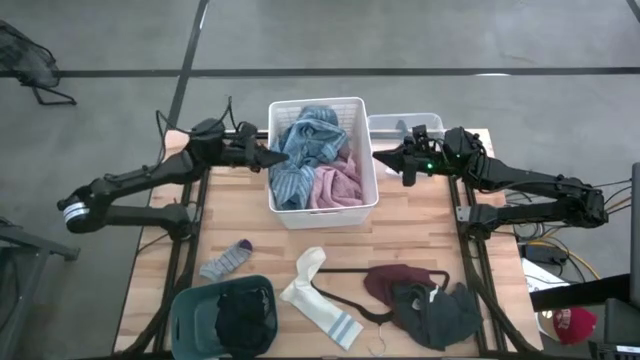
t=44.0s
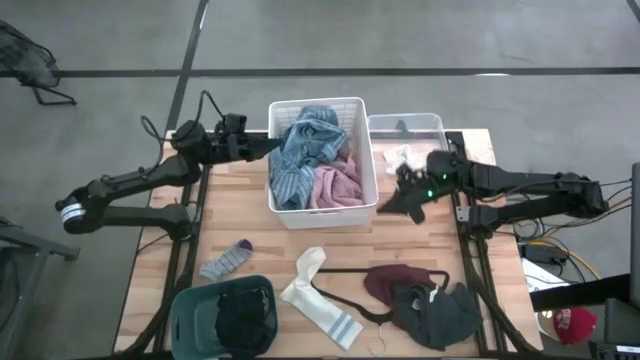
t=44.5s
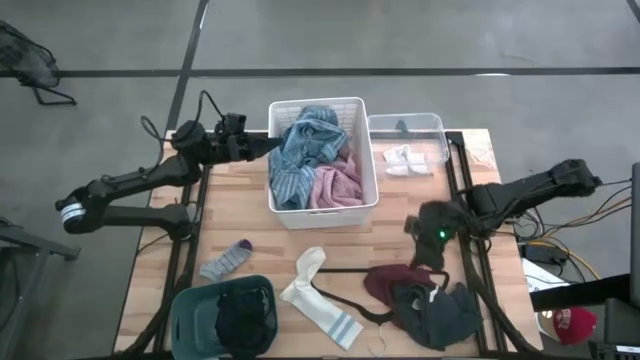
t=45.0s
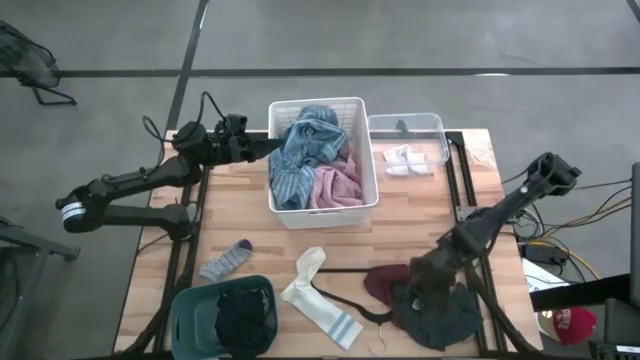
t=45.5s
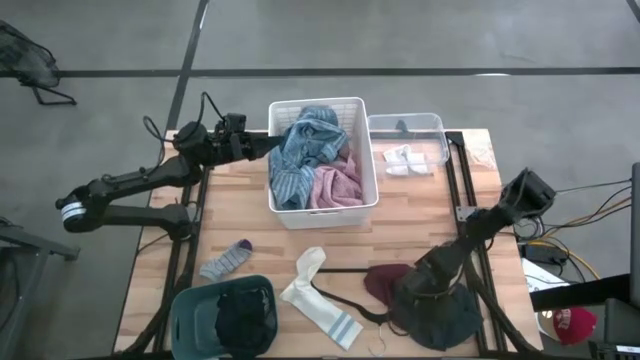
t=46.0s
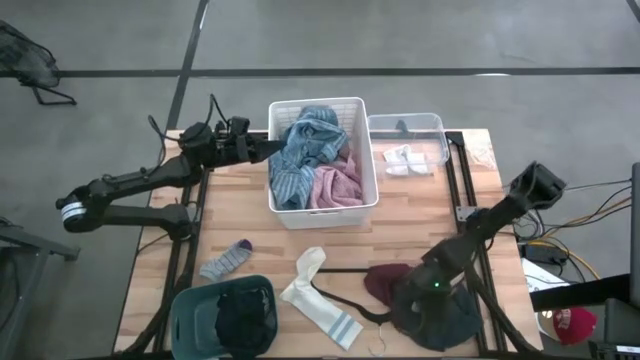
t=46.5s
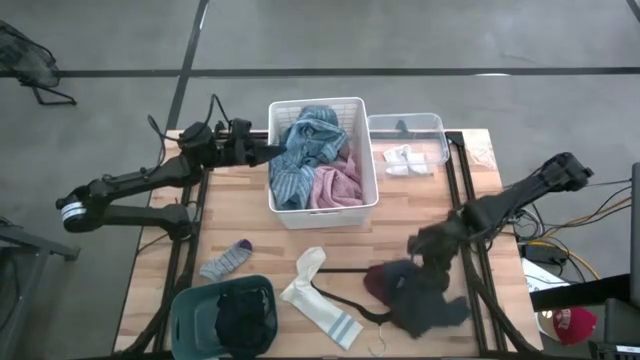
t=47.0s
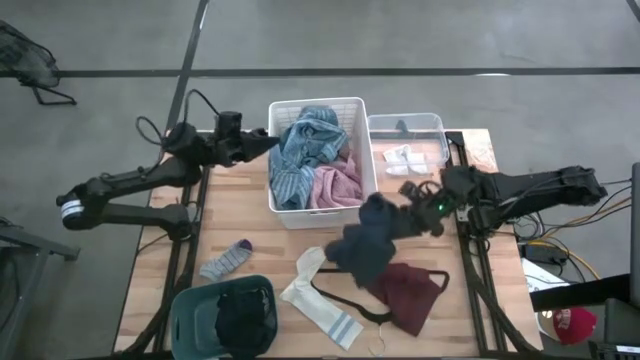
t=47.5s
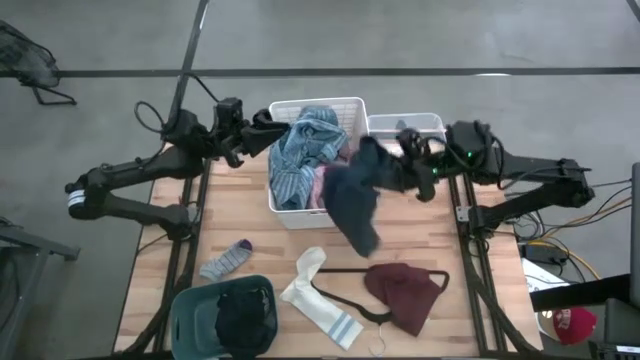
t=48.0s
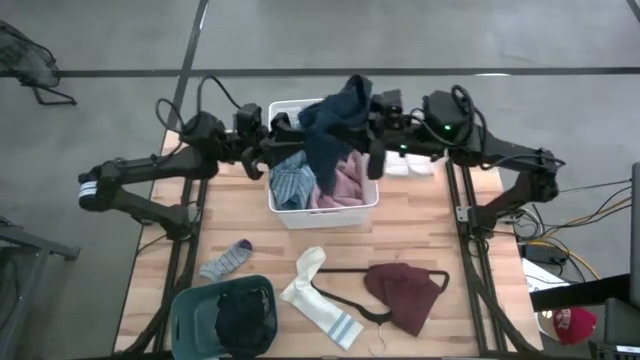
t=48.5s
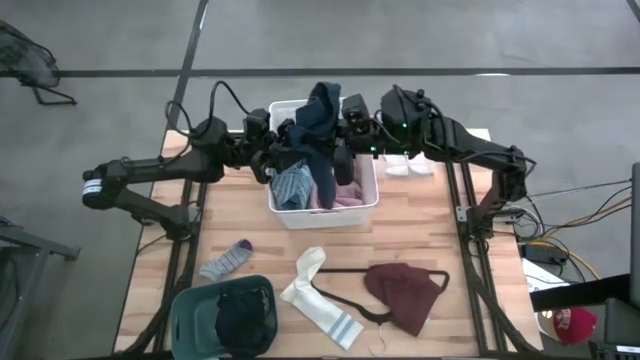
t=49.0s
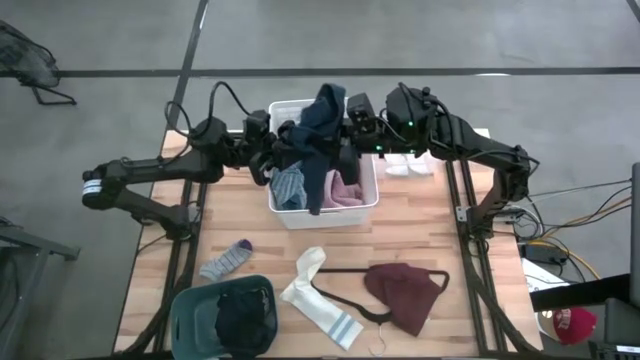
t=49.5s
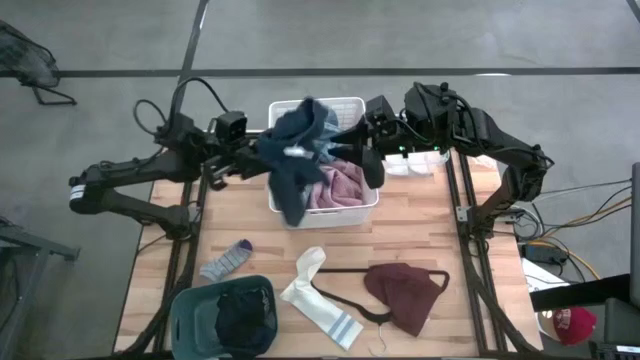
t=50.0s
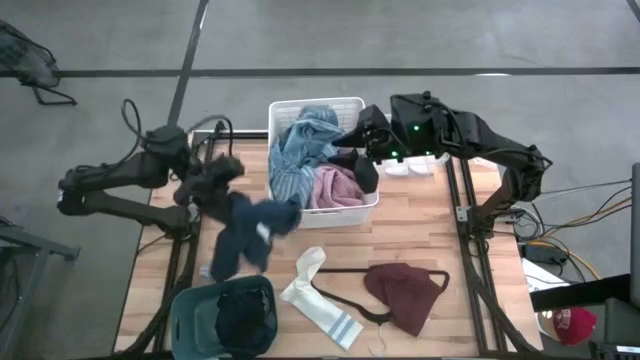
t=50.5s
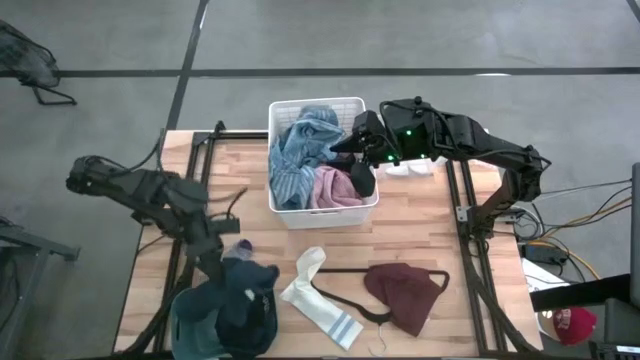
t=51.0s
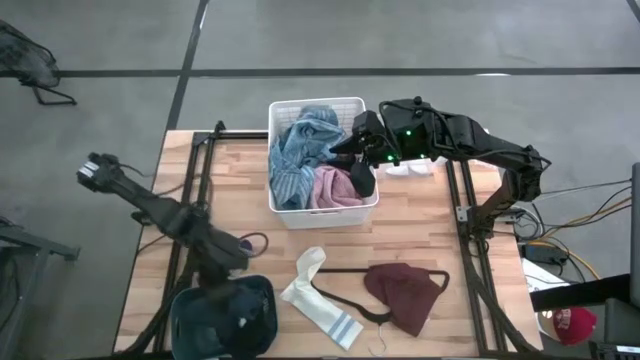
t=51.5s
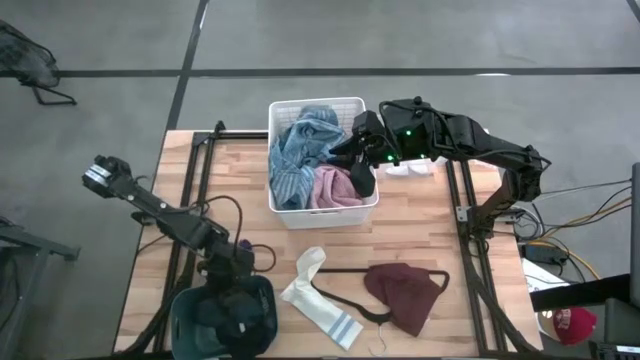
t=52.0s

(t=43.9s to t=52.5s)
Task: Pick & Place Cloths
Put the blue shorts into the green bin

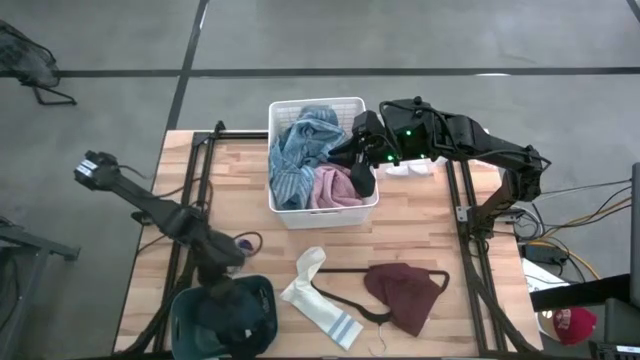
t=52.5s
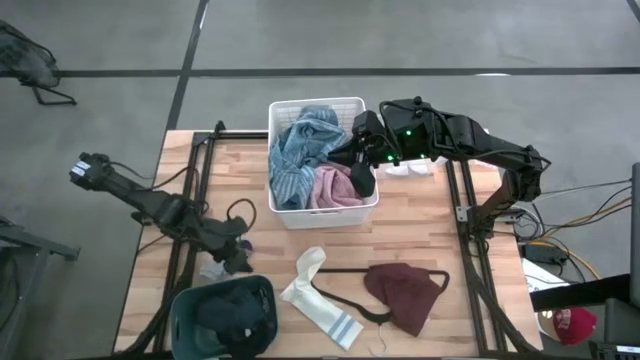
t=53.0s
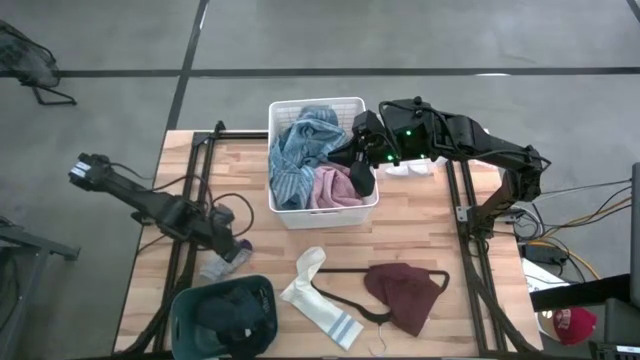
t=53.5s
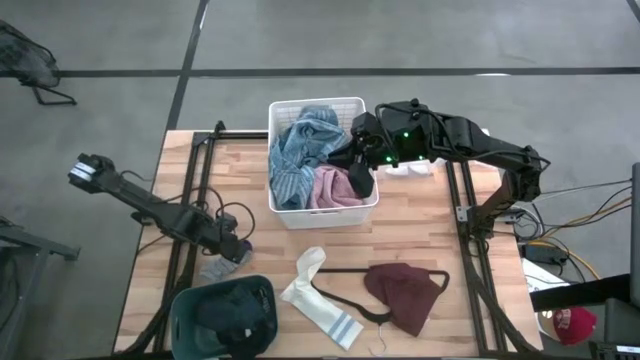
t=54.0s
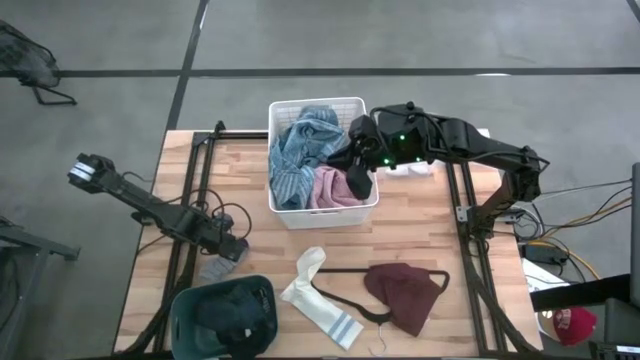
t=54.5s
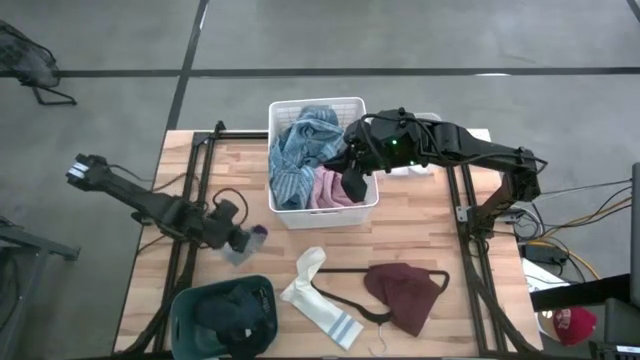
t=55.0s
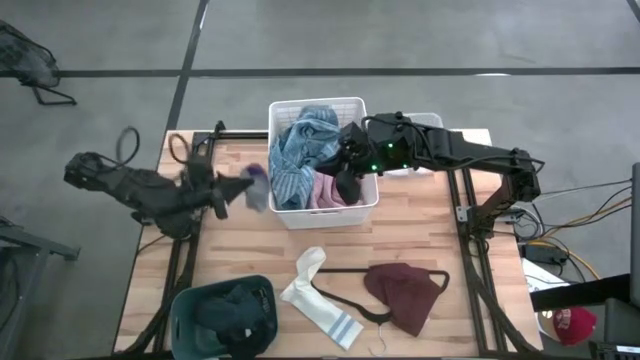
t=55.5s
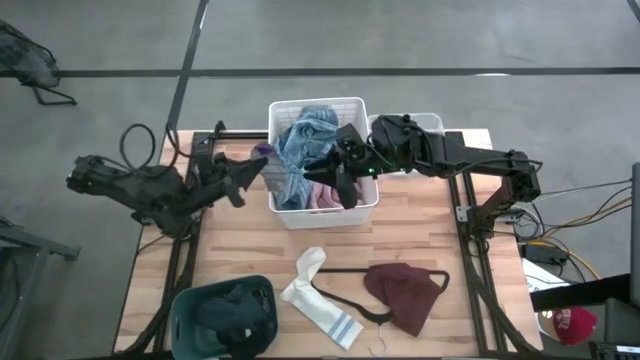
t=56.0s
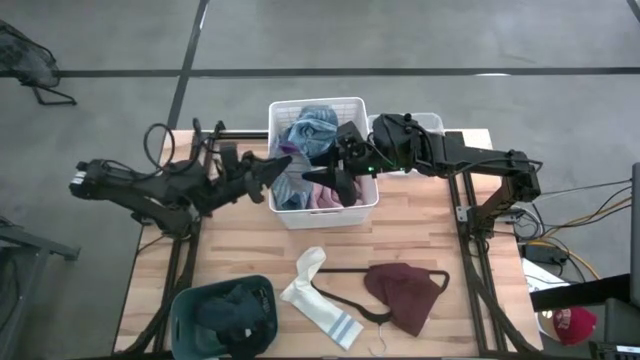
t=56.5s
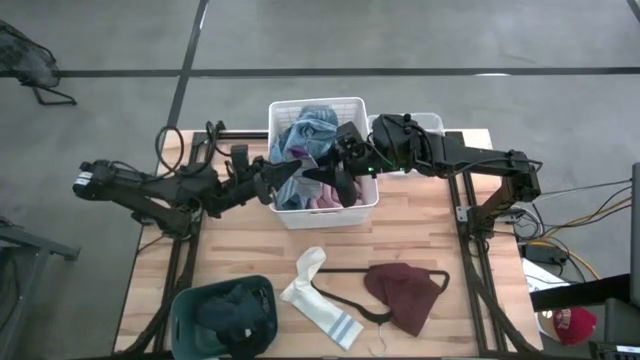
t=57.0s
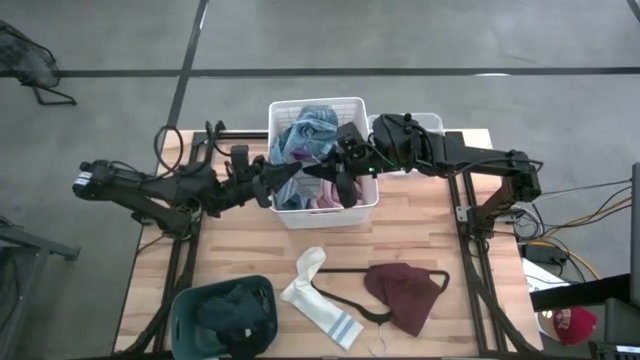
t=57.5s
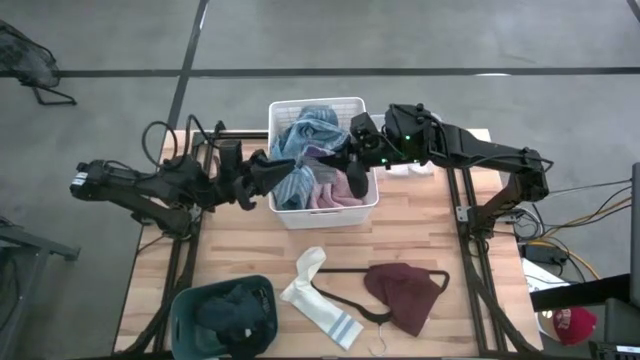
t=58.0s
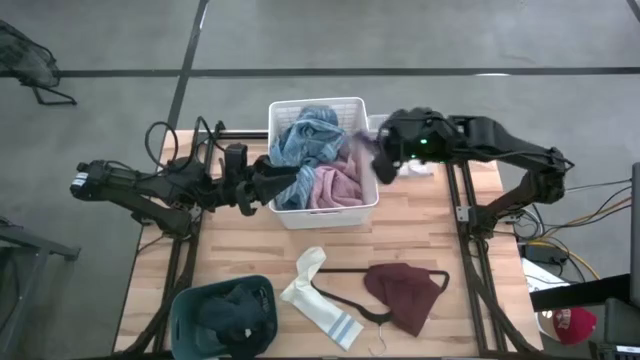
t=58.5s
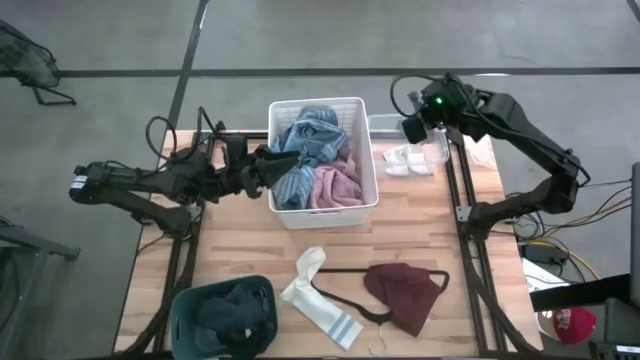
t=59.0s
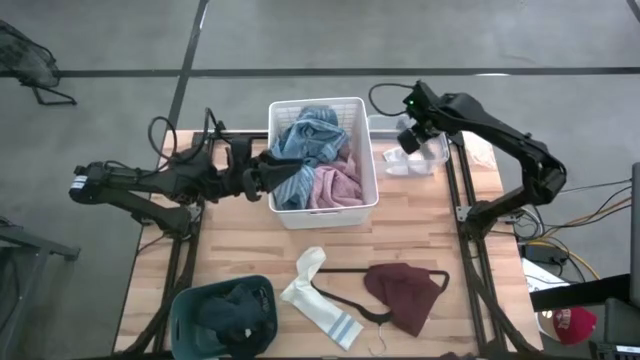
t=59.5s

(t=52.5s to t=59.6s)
Put the gray sock into the transparent container

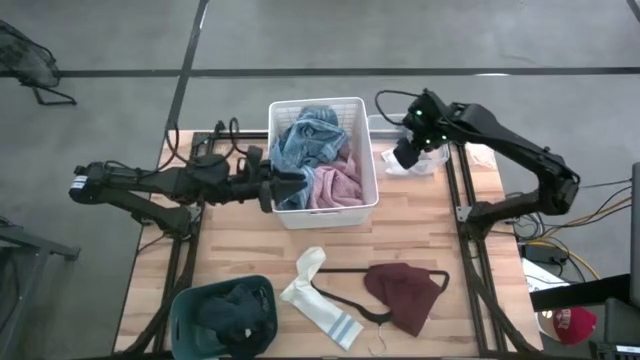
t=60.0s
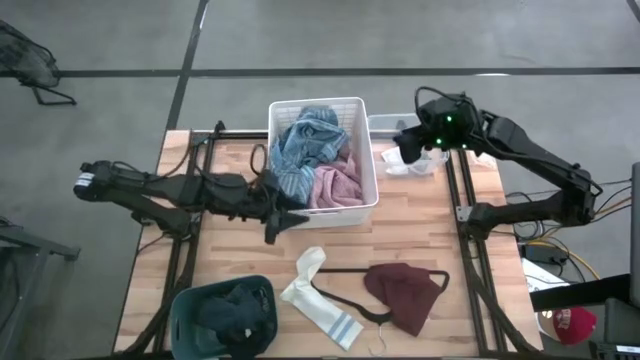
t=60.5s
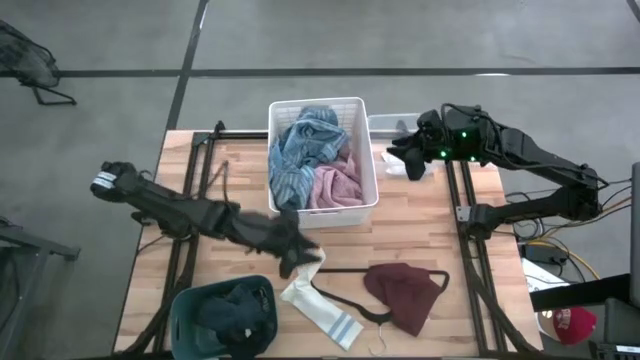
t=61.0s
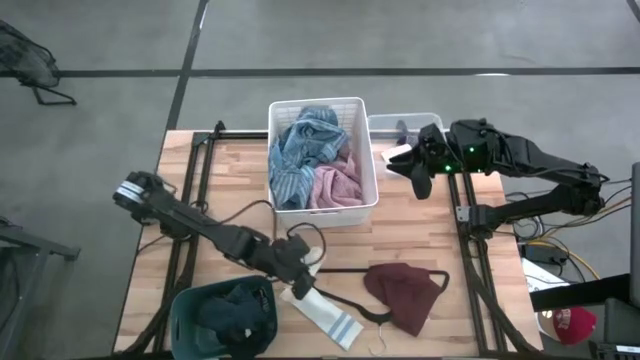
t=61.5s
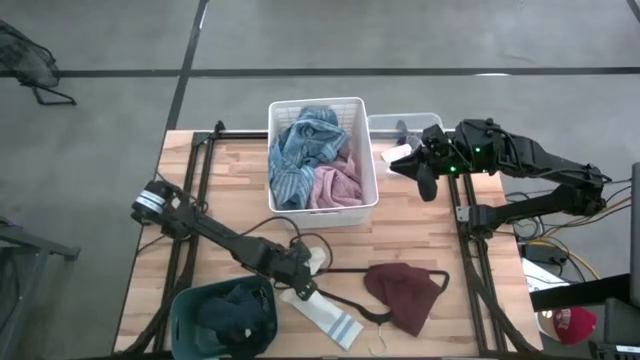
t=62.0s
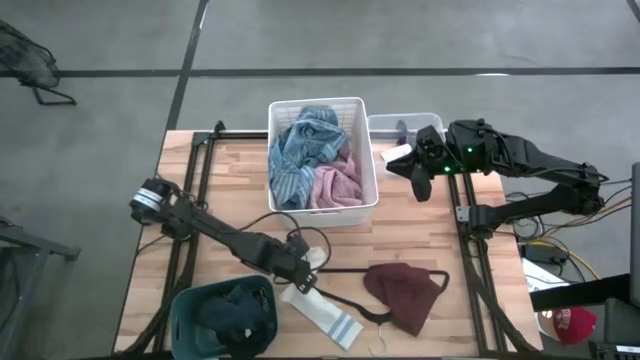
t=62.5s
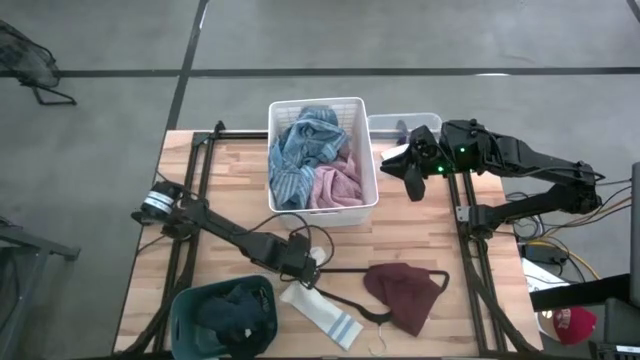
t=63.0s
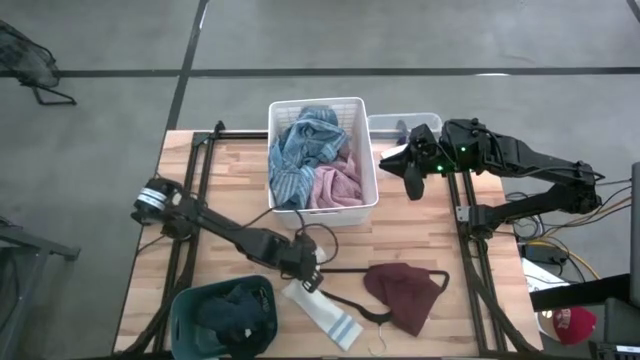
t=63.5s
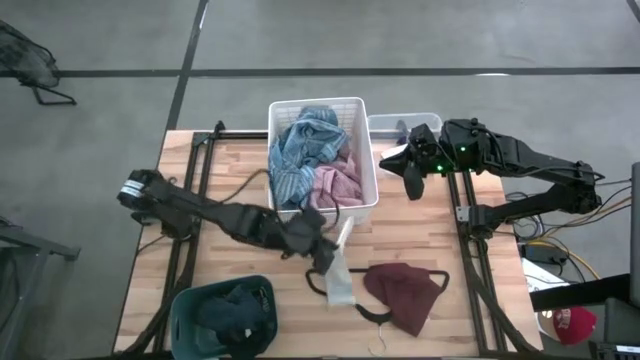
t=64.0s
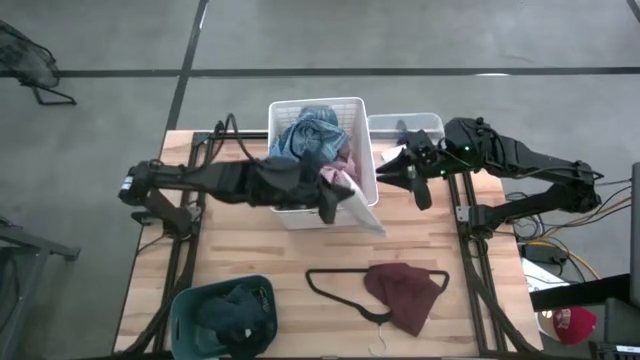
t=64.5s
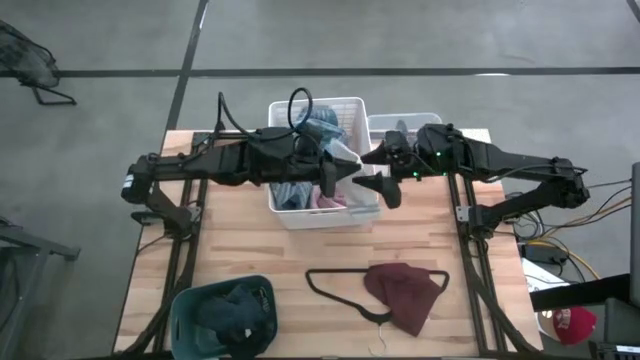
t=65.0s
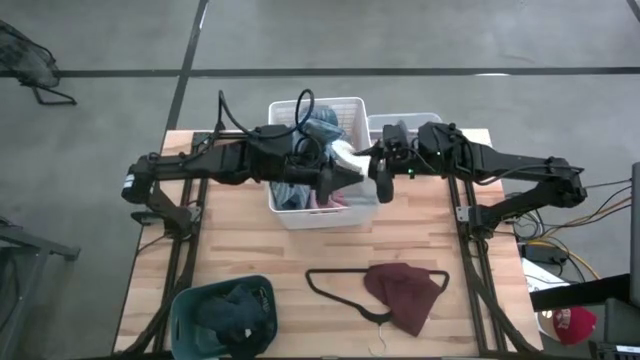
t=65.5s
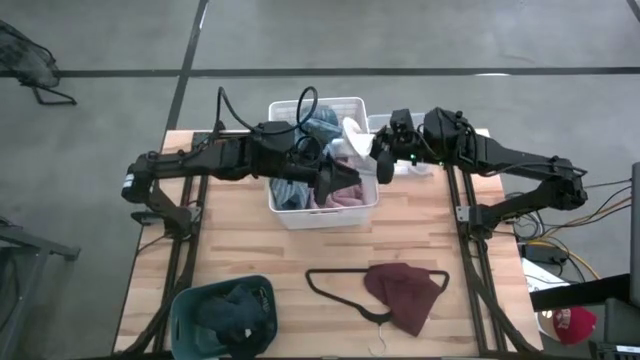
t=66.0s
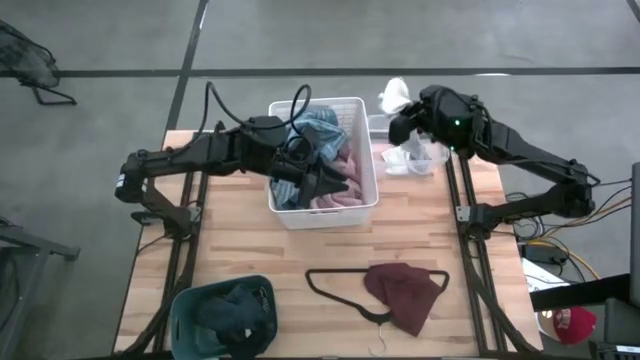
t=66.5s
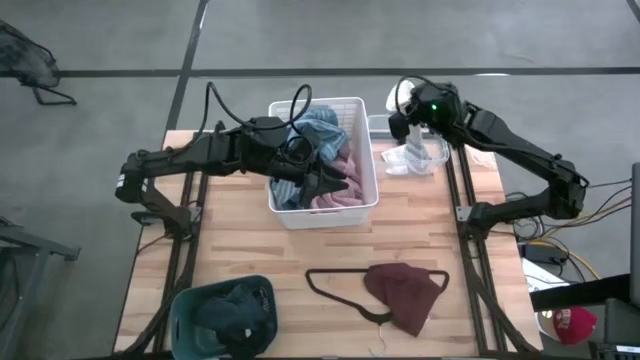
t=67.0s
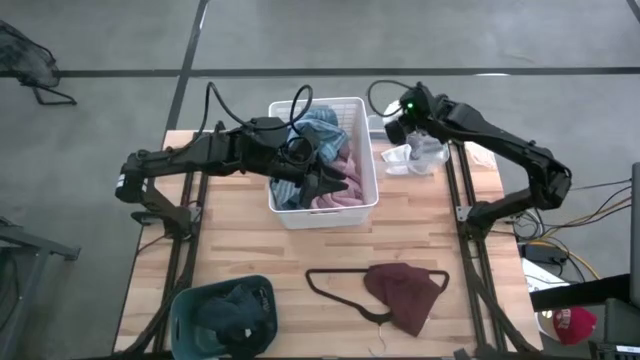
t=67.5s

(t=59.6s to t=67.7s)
Put the white sock into the transparent container
